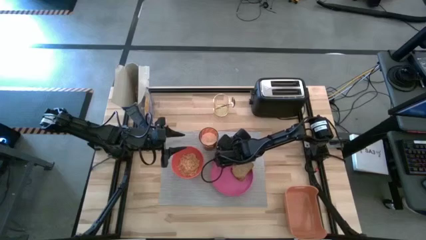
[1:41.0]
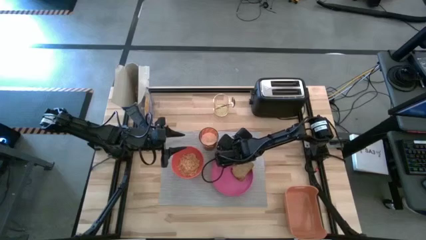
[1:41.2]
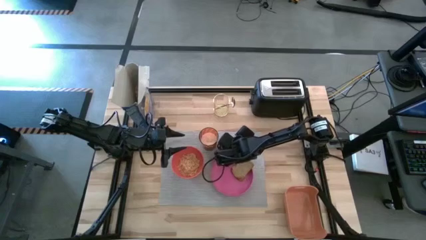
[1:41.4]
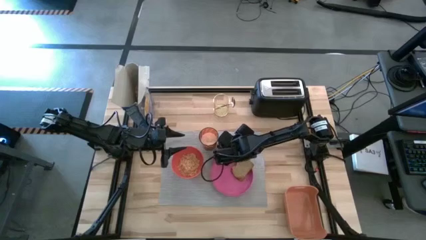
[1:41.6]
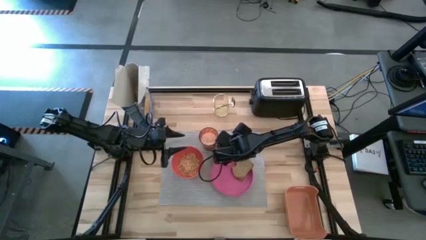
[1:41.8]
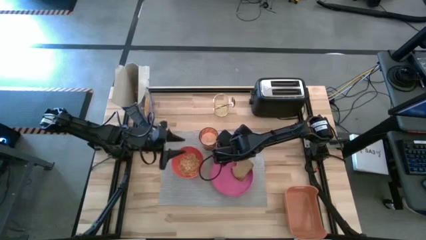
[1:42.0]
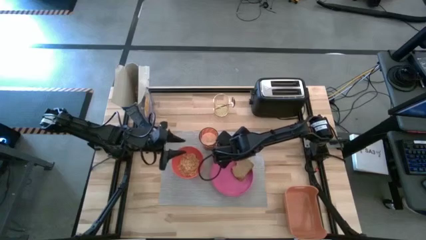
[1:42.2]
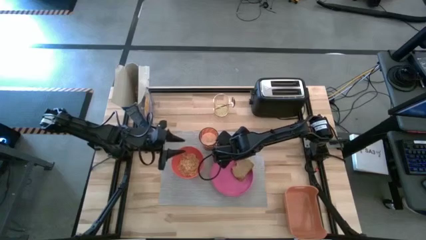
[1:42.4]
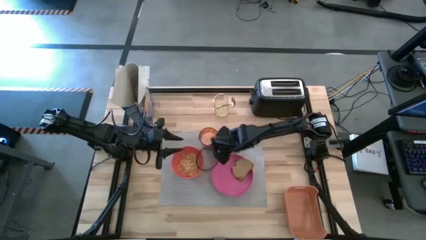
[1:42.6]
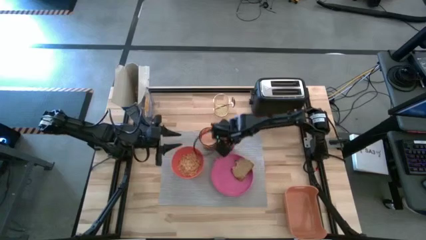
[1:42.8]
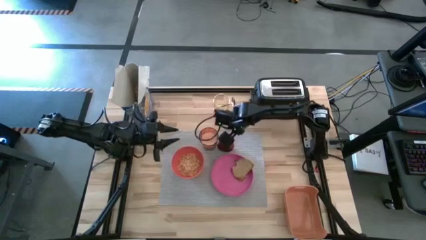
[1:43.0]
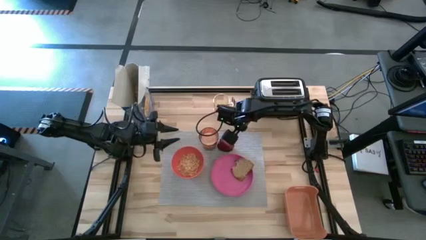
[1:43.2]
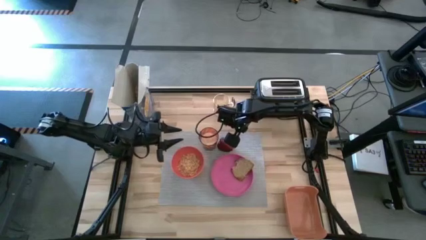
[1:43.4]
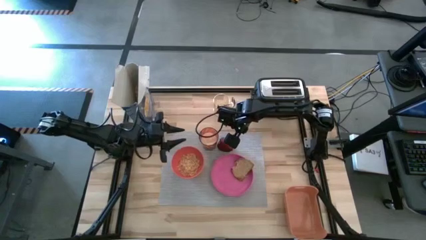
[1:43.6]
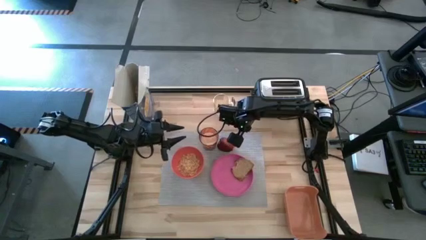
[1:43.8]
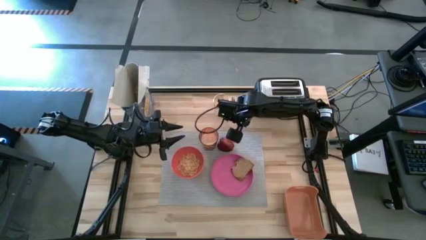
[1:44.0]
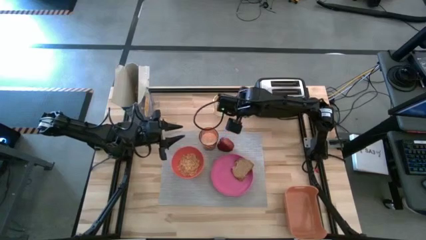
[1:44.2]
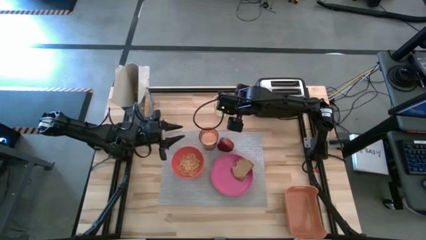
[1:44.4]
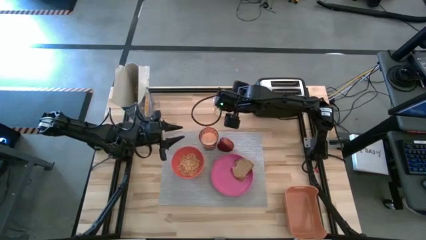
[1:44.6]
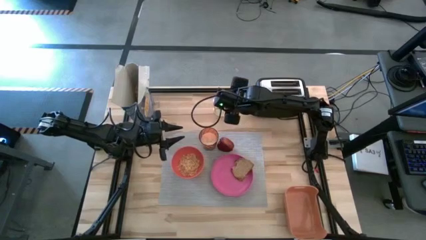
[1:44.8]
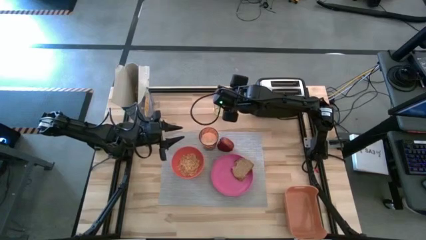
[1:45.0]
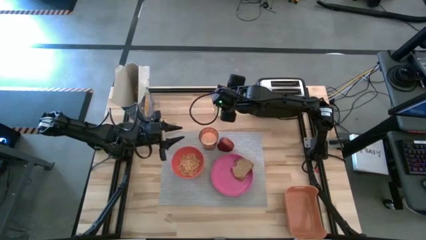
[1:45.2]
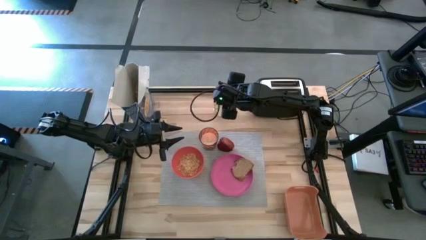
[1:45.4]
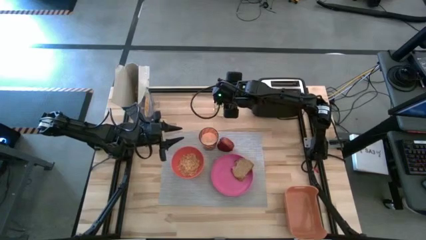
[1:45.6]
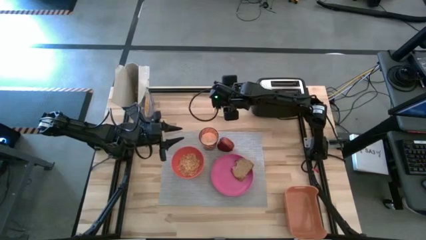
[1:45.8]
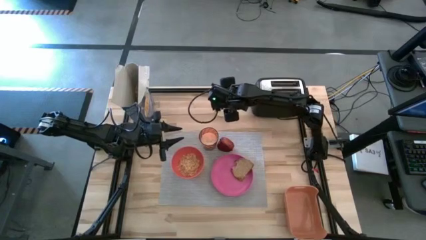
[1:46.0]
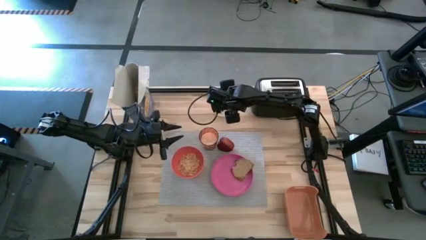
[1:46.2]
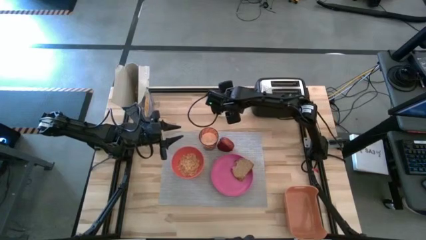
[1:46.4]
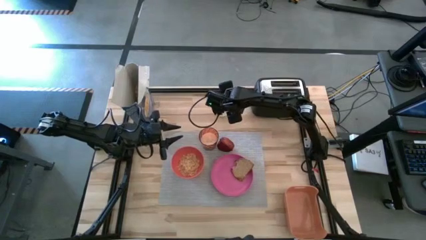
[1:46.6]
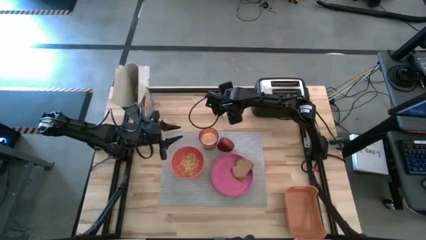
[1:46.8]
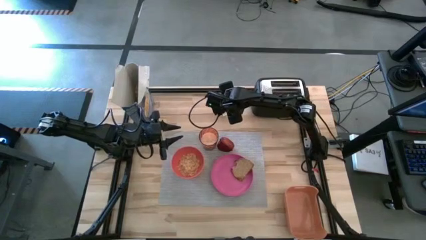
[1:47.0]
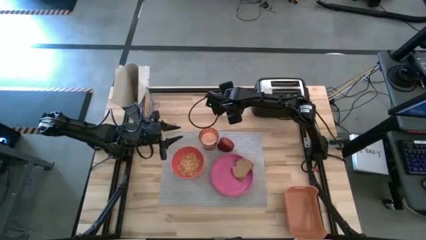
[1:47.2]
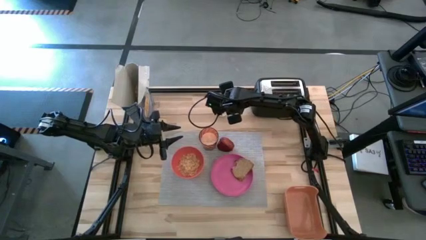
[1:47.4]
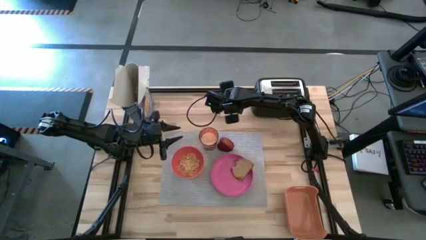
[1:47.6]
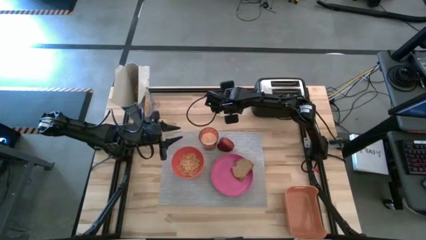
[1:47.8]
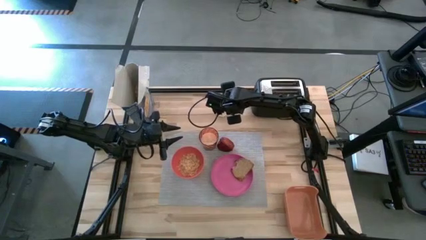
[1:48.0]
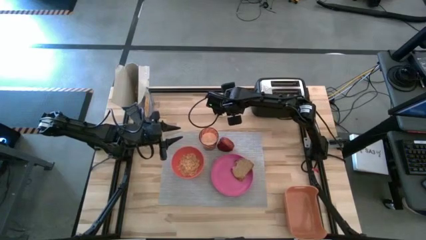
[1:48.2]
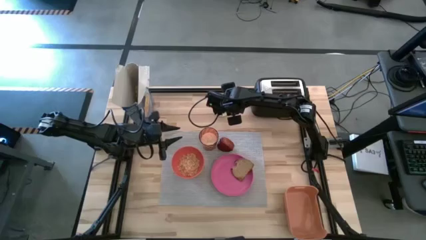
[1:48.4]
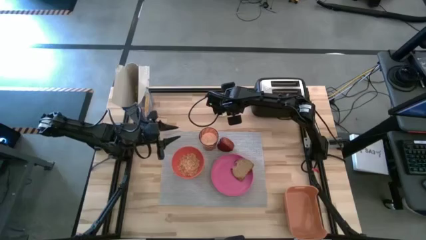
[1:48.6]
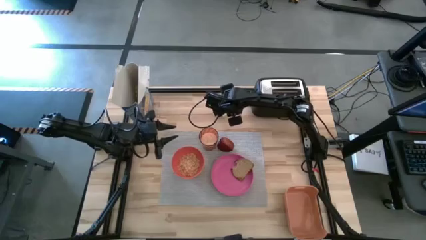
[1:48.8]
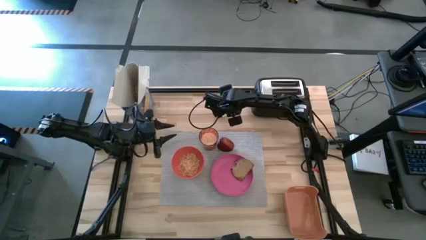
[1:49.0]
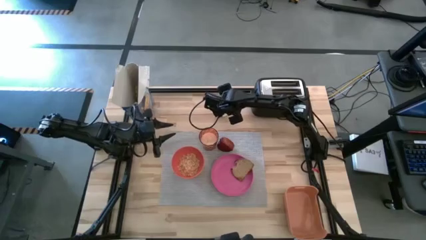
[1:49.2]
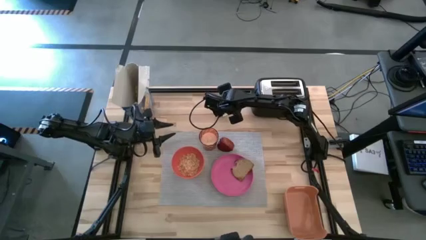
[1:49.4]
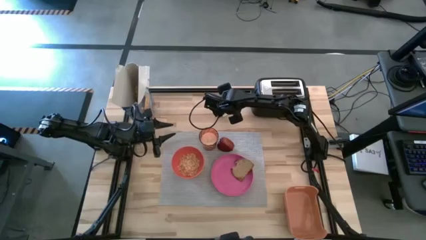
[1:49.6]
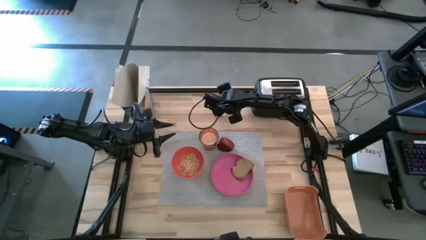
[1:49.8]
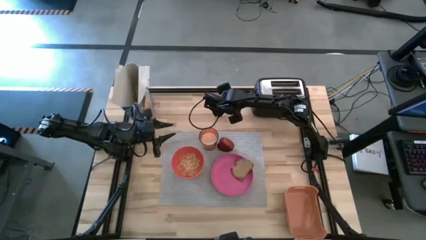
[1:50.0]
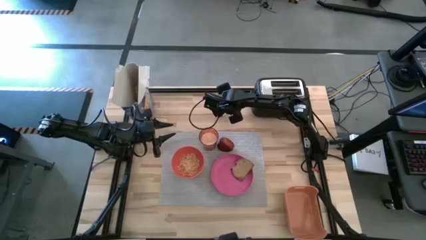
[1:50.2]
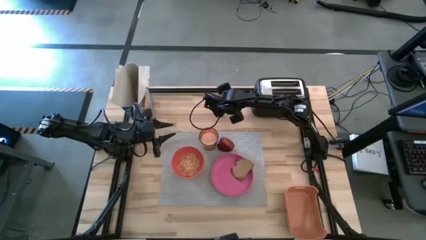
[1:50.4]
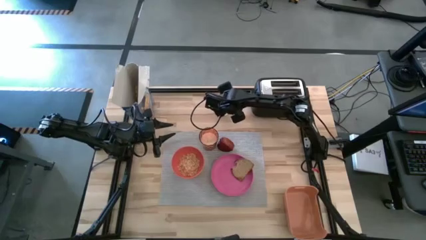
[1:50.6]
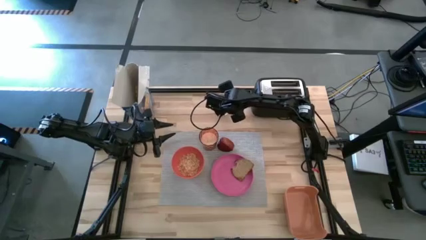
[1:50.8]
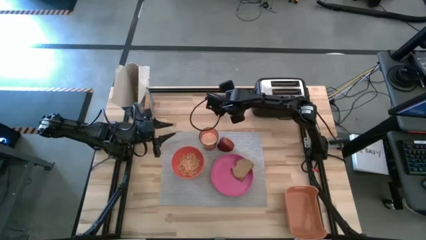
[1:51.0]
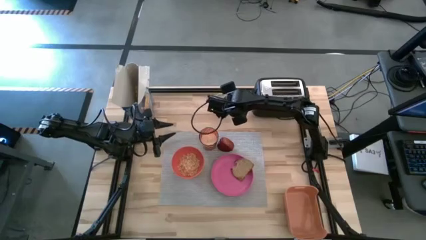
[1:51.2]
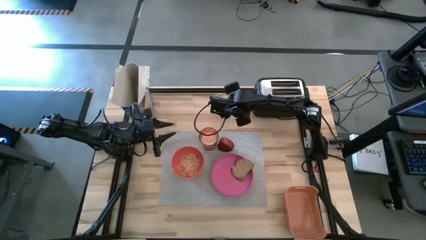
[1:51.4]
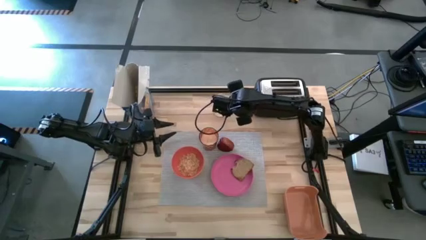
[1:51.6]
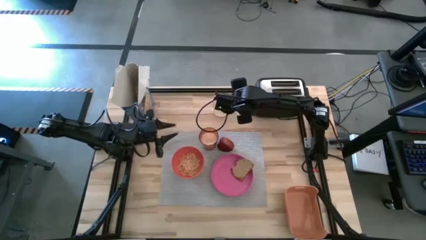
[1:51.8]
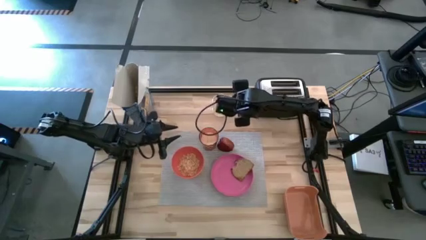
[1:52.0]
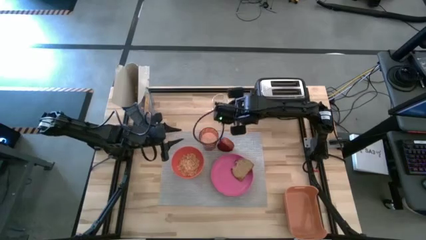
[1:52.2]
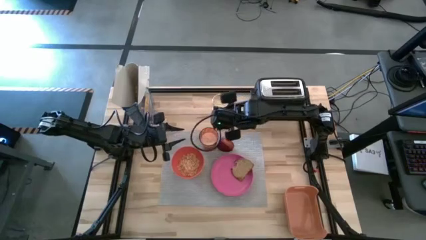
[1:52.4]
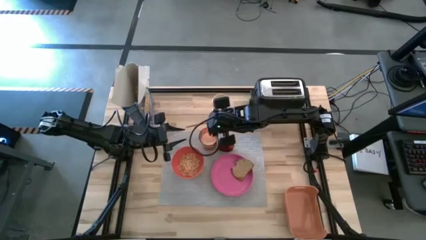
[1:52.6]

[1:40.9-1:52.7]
Task: Arrange a breakfast setting
Put the yellow spoon from the orange cup on the gray placemat
